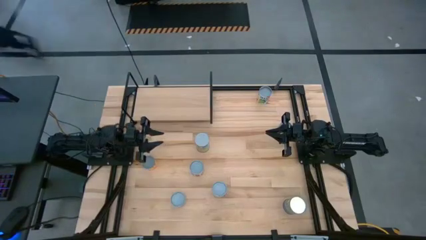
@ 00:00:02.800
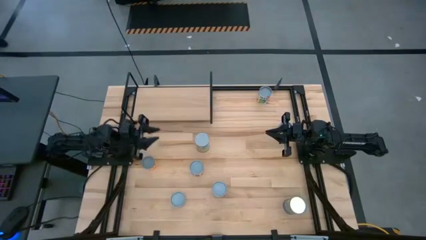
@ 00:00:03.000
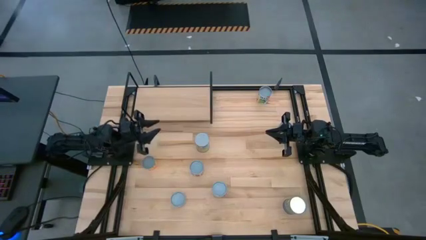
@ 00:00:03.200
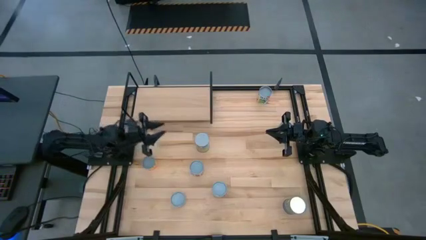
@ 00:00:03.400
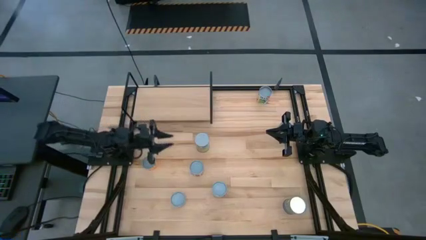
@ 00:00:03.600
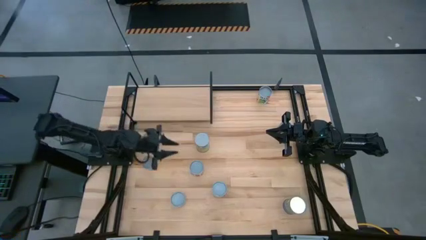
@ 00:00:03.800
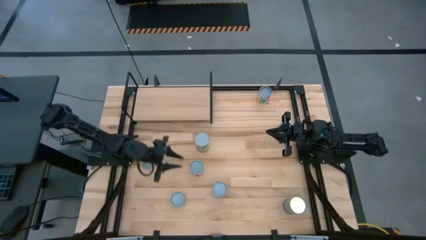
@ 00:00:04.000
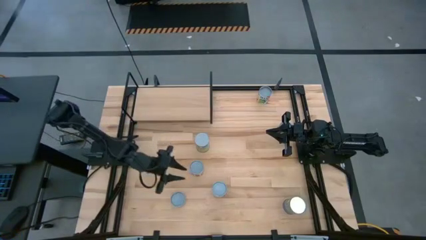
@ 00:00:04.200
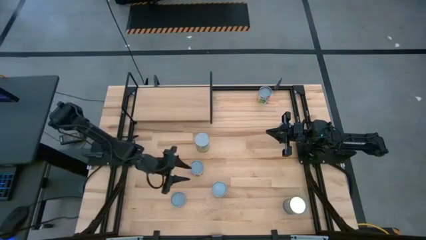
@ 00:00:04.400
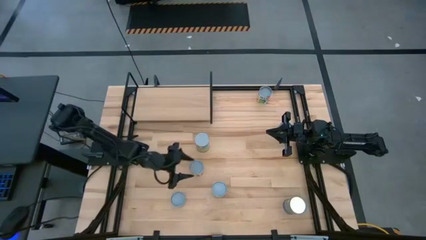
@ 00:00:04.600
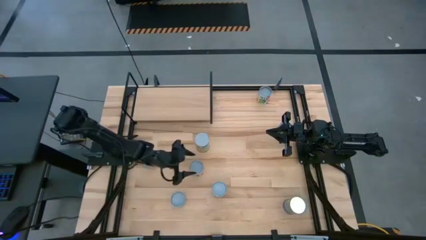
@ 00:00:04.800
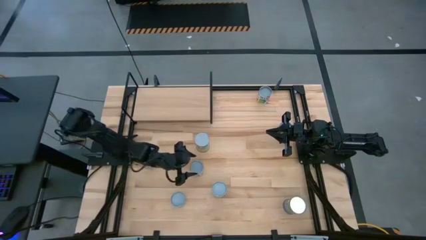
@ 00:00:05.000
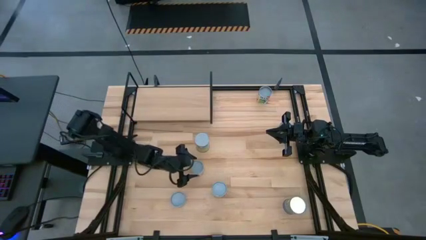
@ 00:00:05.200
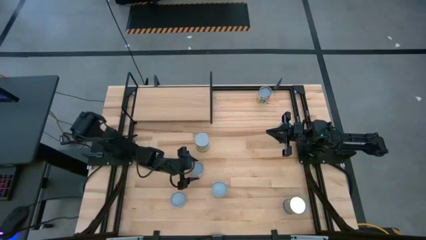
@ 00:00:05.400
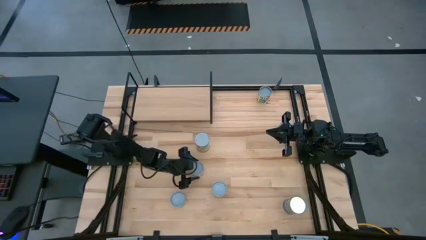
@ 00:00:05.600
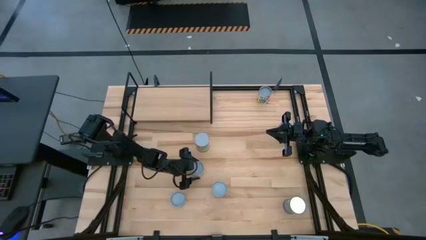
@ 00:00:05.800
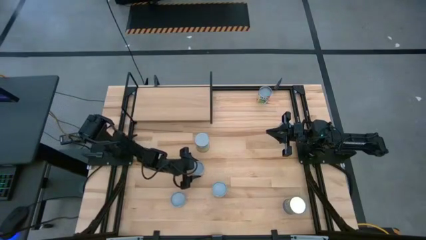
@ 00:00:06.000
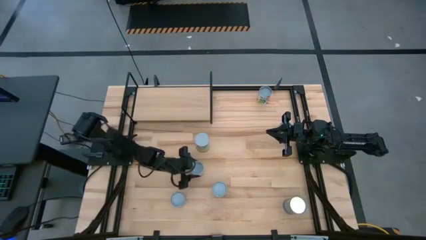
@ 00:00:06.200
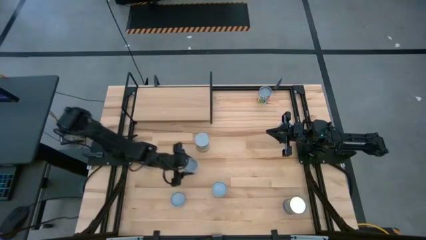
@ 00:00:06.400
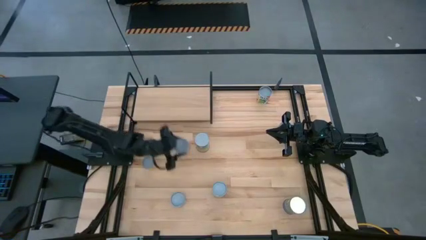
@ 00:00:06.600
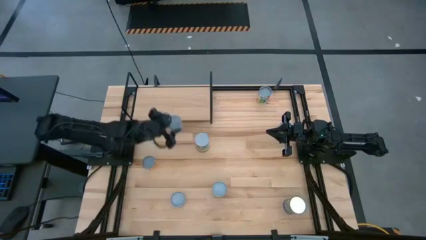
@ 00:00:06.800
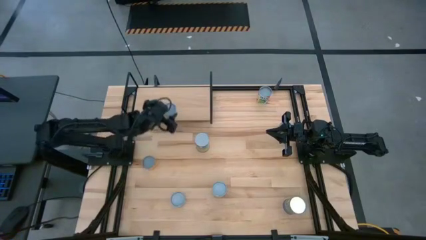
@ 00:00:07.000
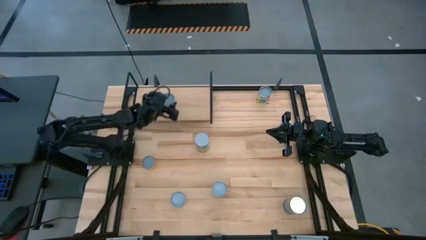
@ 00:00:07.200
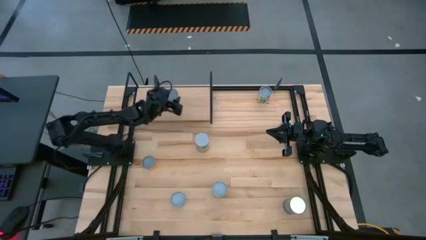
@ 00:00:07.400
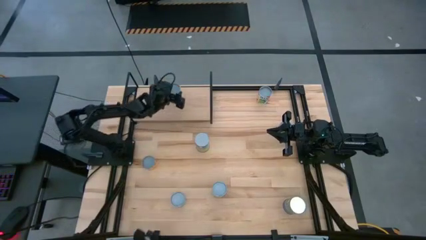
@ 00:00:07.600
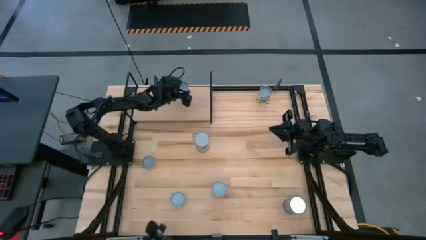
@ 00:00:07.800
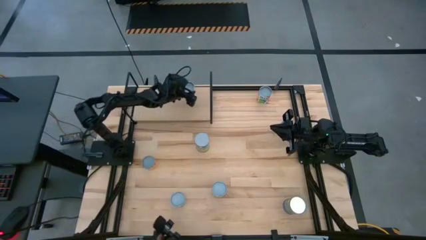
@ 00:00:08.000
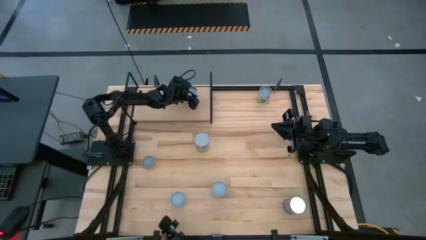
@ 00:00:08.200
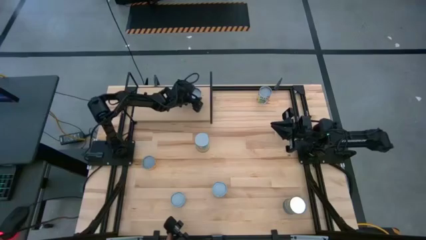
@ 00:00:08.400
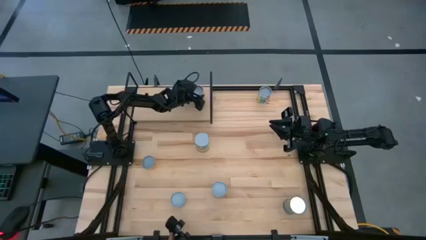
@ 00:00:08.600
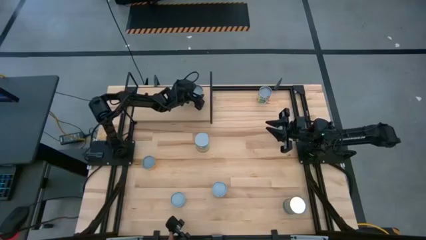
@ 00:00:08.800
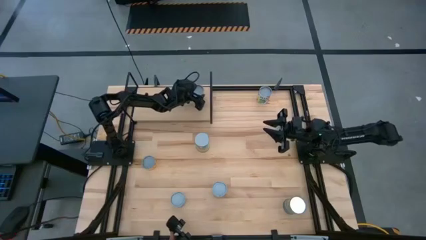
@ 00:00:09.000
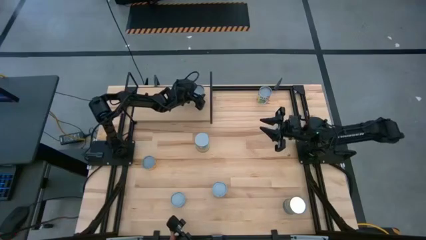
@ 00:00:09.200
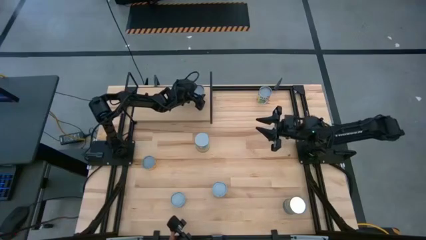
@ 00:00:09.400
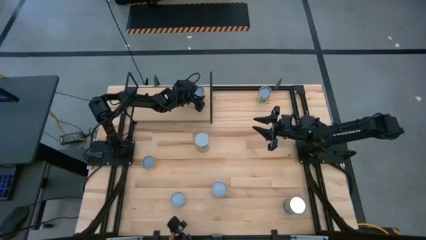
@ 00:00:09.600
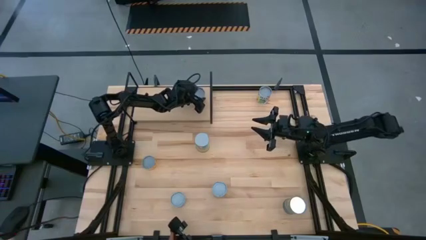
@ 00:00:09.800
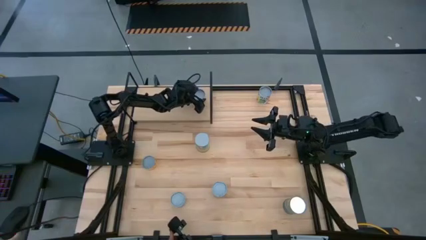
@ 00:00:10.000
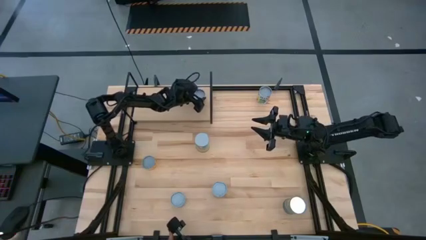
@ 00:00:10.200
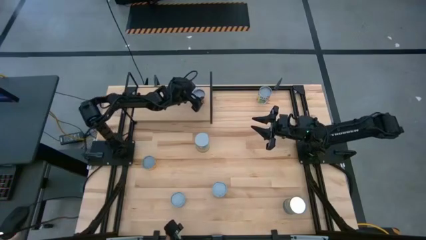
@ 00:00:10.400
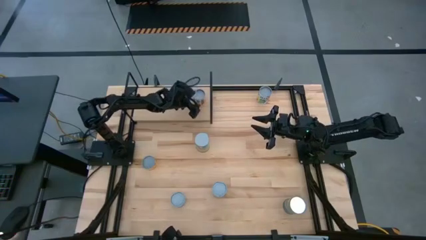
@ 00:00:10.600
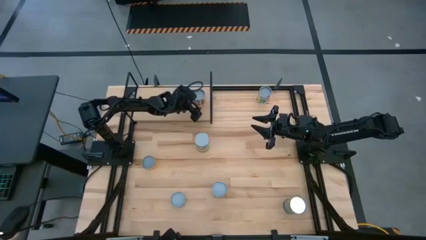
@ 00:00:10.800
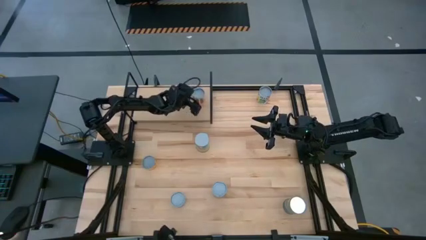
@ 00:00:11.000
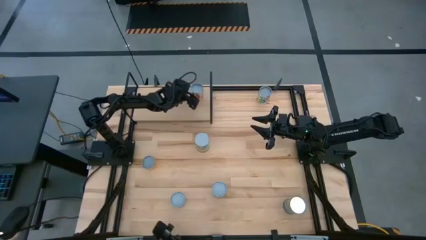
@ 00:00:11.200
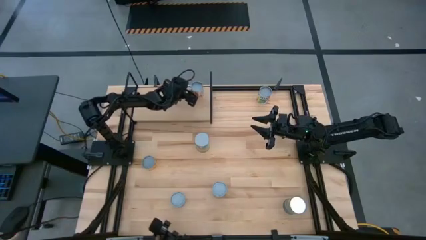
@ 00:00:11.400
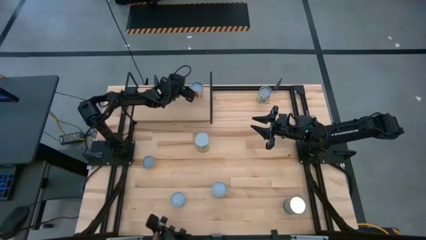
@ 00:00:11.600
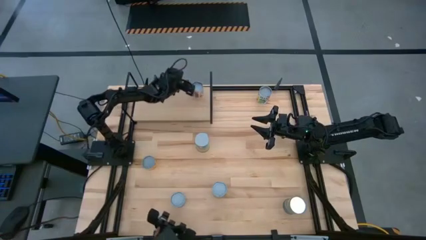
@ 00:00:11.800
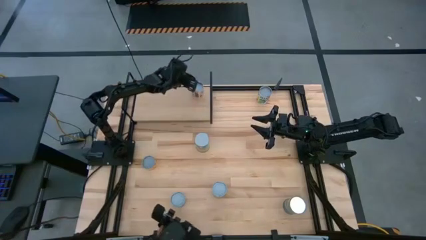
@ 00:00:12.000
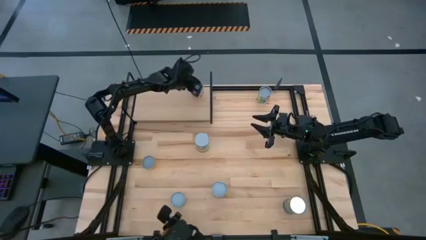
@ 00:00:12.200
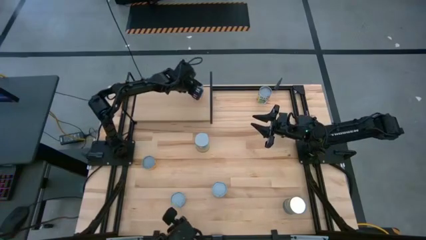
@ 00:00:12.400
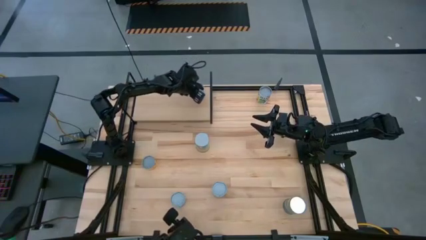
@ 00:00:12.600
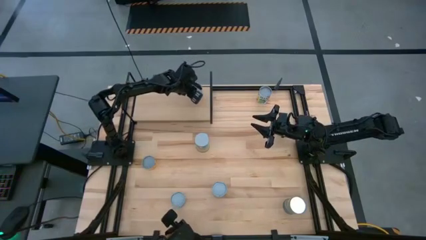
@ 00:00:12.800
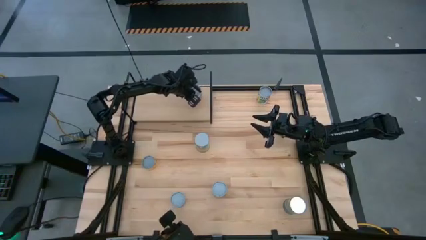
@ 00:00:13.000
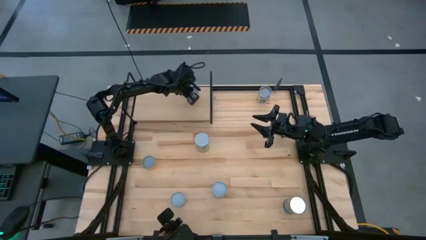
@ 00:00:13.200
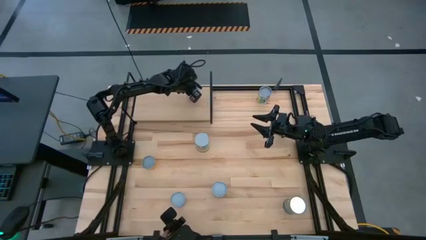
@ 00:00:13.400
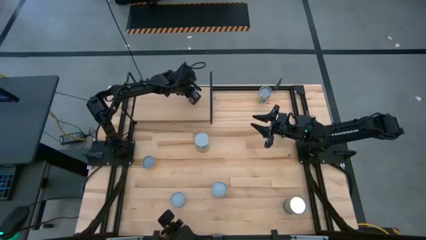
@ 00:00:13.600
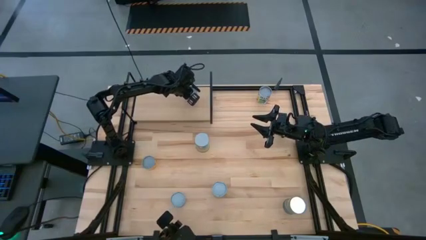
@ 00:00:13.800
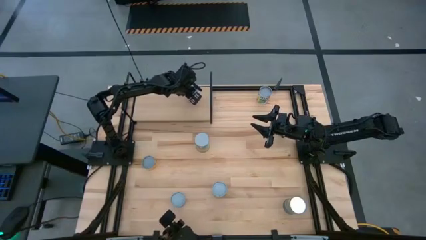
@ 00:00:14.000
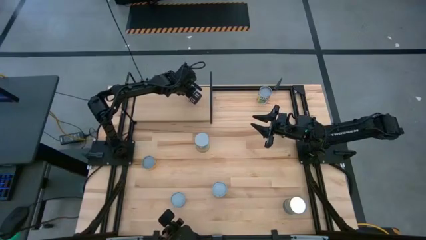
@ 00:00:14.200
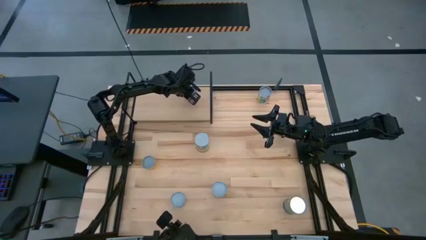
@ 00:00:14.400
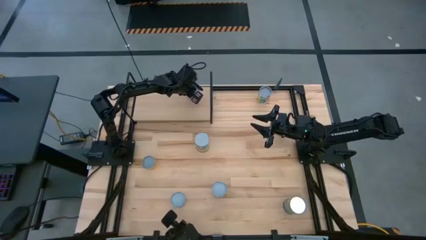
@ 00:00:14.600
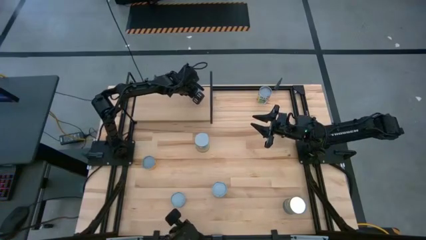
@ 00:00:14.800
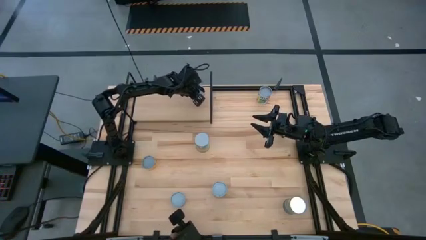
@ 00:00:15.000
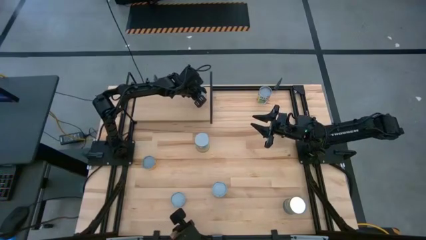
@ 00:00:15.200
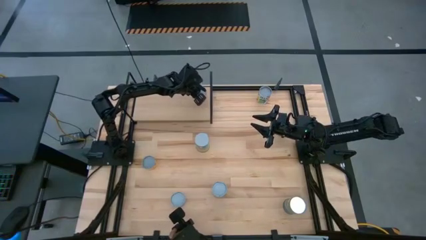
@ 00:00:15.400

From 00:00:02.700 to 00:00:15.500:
Task: Pick and place cans onto a shelf
Put the canned diced tomato on the shelf

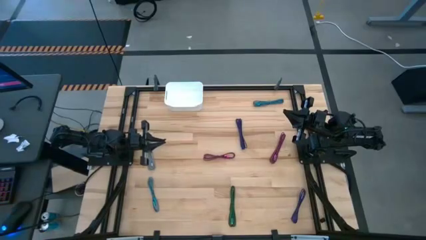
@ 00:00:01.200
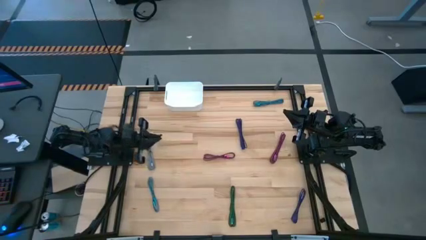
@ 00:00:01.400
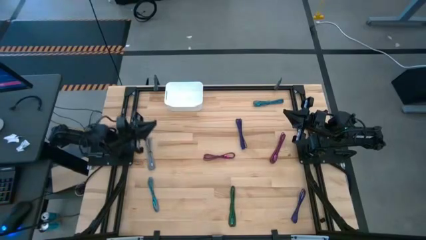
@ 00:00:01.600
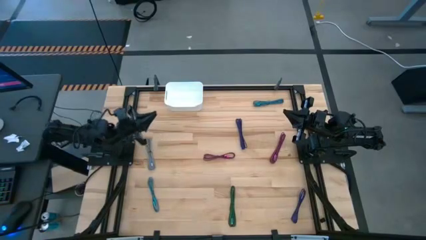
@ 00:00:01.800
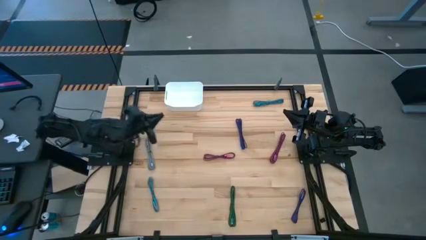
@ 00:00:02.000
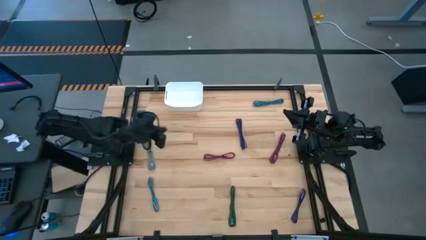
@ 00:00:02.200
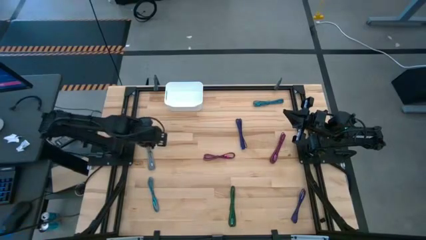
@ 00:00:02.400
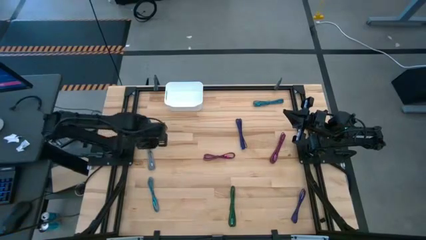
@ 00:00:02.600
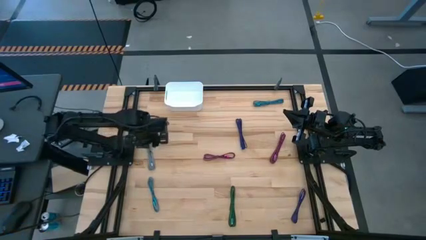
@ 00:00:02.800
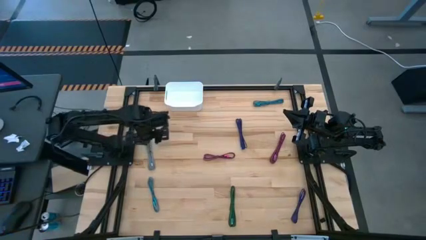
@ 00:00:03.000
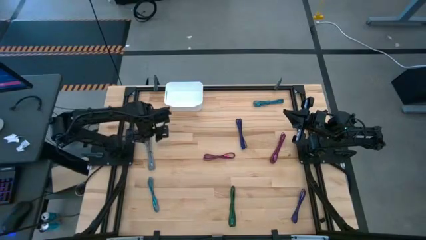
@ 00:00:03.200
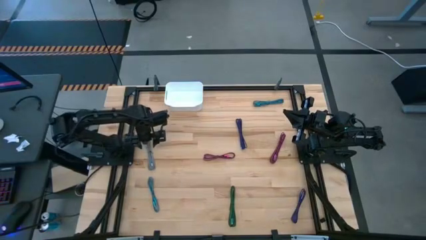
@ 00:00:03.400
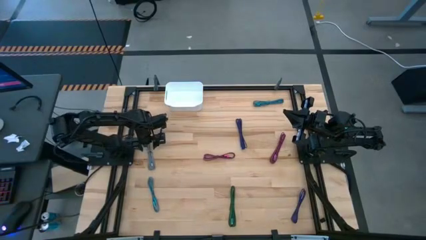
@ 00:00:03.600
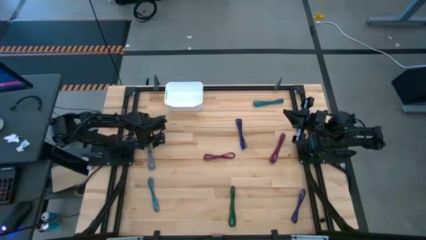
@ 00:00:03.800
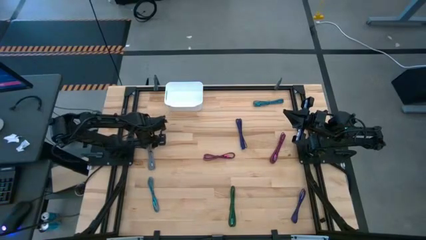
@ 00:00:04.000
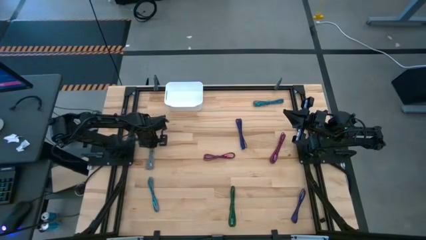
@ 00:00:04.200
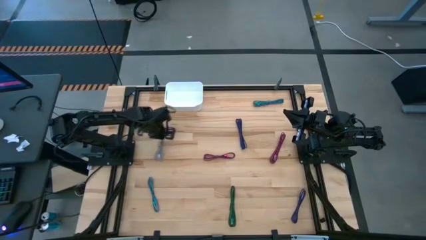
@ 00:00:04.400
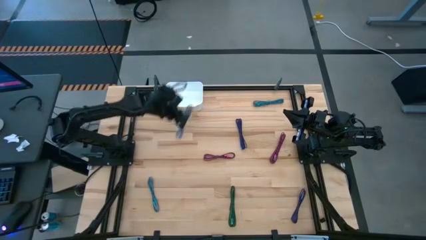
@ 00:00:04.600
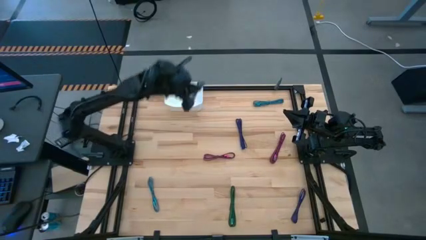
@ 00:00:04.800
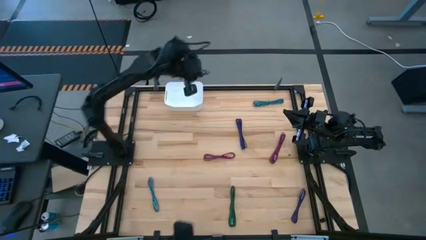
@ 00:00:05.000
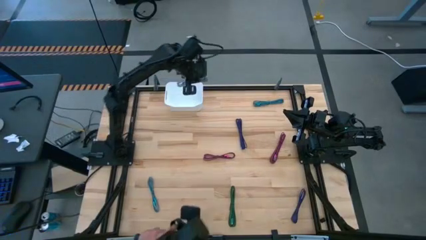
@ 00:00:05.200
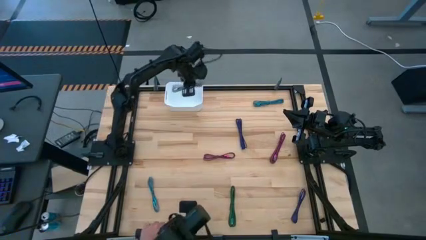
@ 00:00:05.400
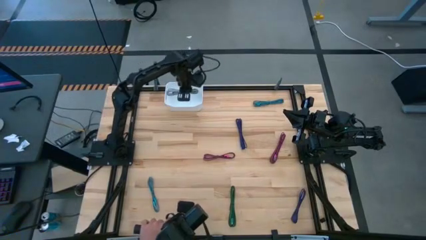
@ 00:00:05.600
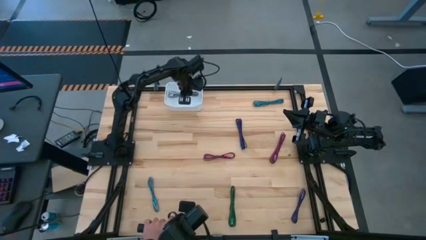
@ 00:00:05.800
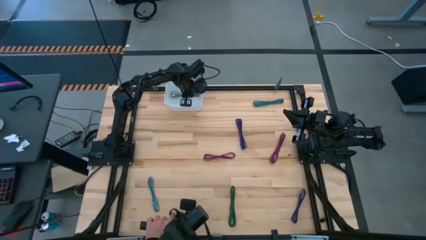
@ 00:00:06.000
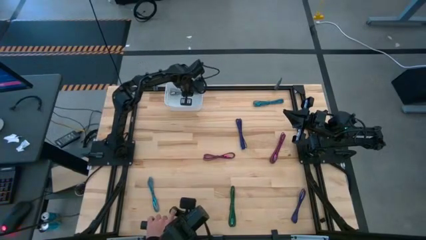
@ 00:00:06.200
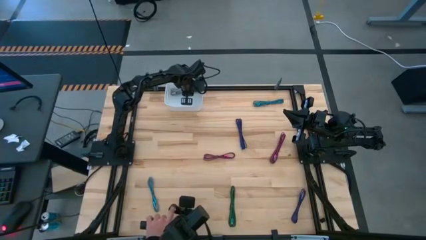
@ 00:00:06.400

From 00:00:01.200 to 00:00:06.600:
Task: Pick and place USB-C Cables
Put the white charger cable into the white bin
